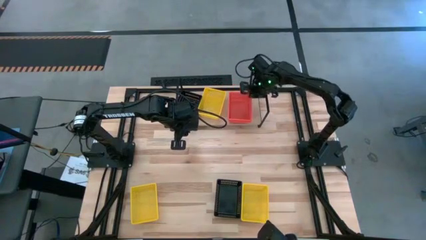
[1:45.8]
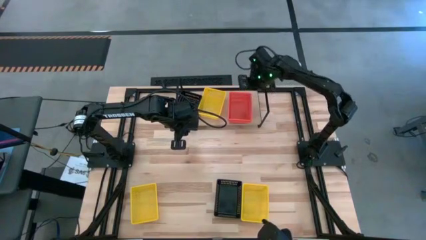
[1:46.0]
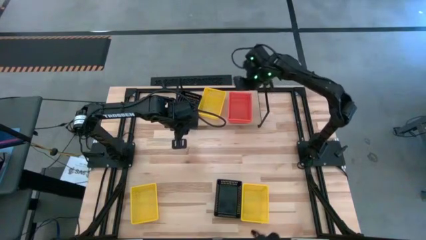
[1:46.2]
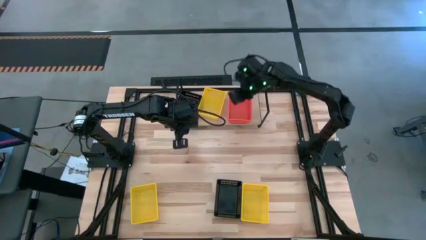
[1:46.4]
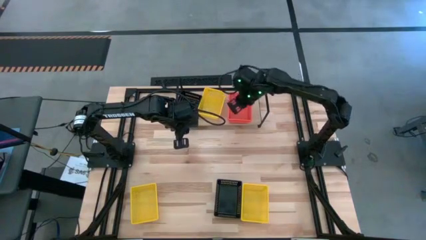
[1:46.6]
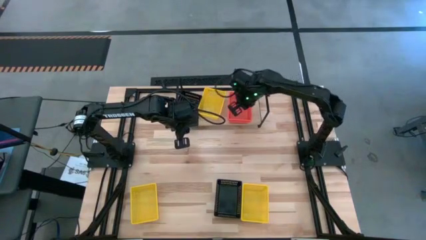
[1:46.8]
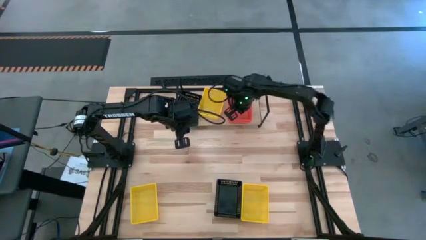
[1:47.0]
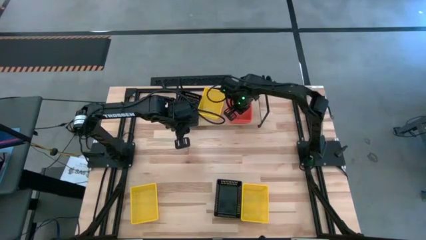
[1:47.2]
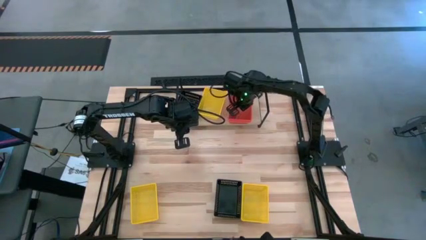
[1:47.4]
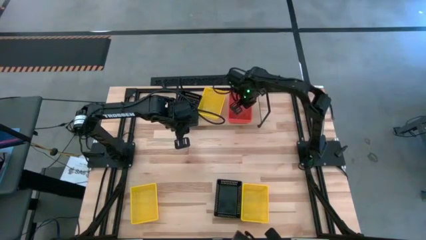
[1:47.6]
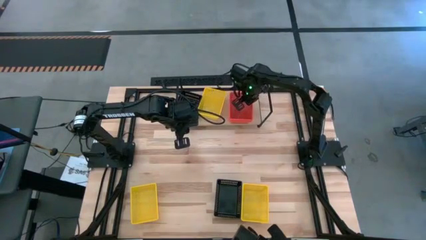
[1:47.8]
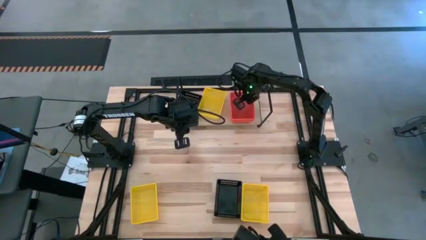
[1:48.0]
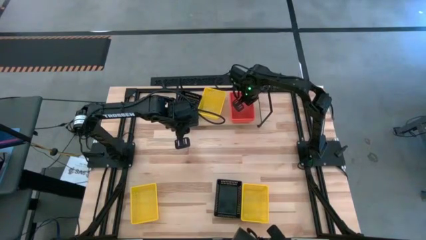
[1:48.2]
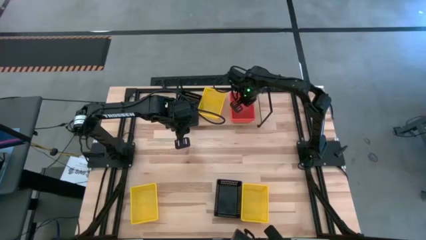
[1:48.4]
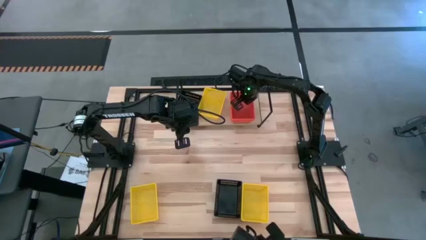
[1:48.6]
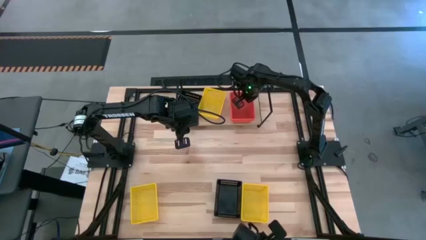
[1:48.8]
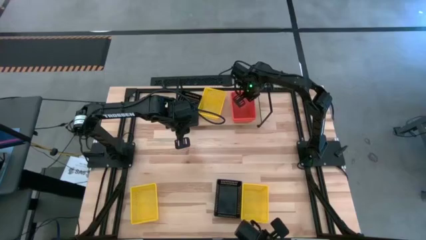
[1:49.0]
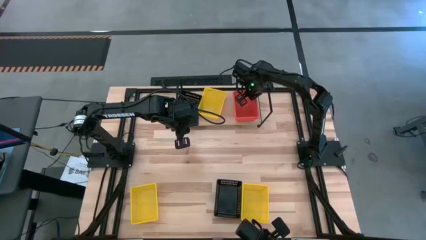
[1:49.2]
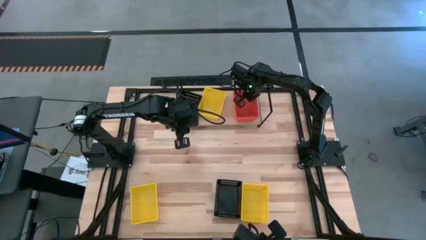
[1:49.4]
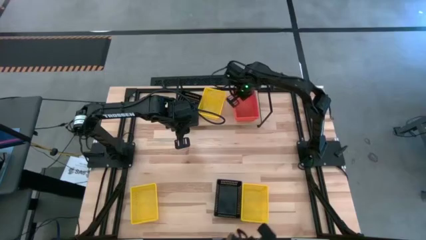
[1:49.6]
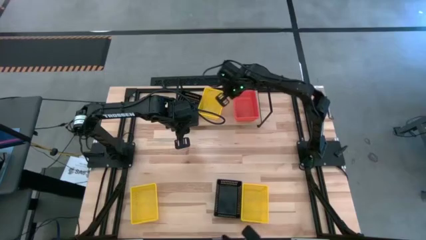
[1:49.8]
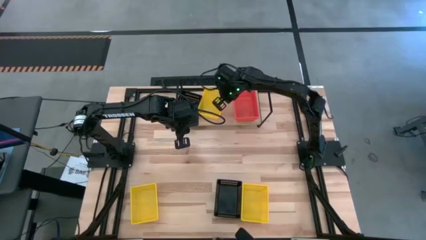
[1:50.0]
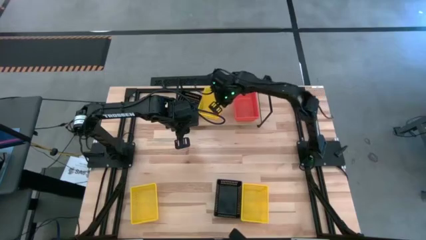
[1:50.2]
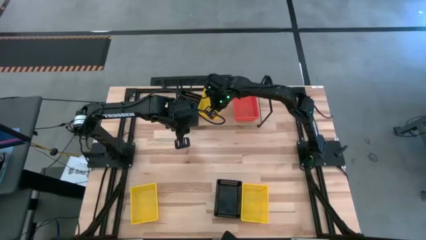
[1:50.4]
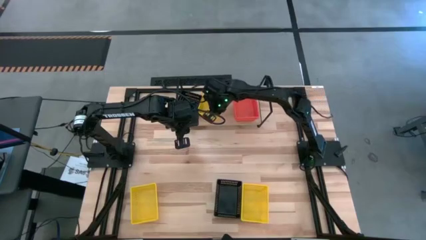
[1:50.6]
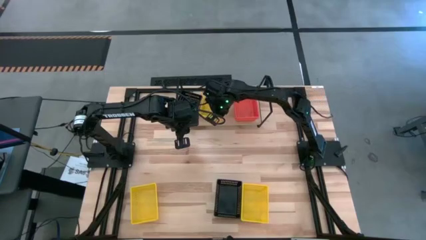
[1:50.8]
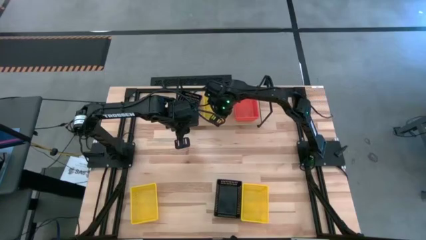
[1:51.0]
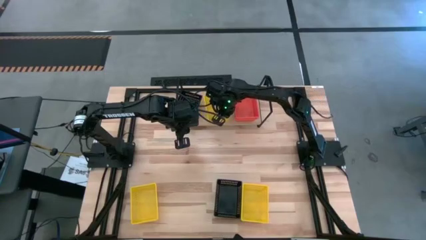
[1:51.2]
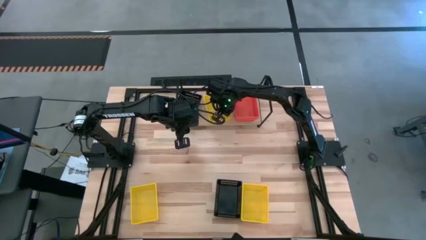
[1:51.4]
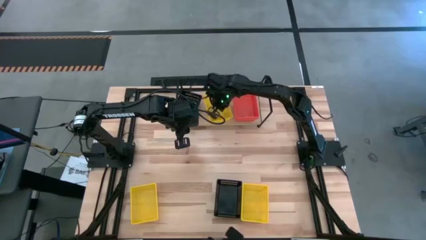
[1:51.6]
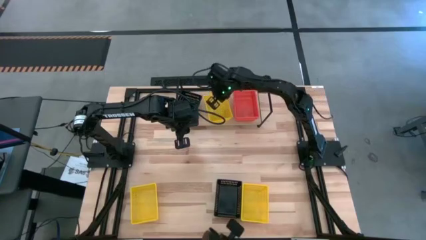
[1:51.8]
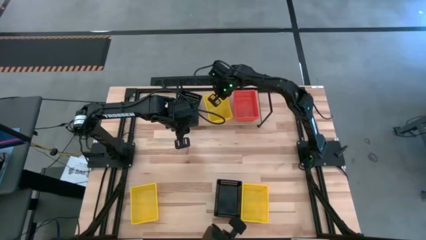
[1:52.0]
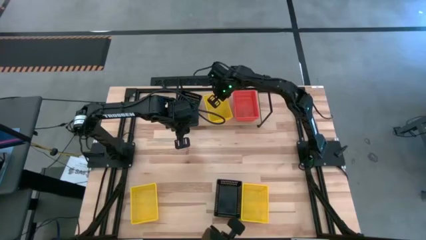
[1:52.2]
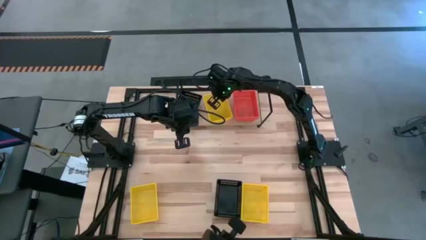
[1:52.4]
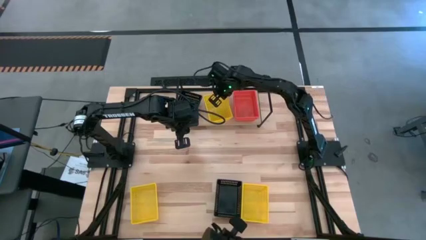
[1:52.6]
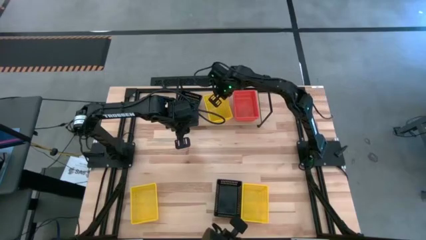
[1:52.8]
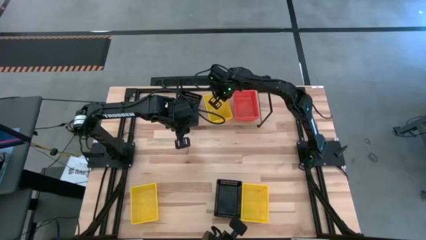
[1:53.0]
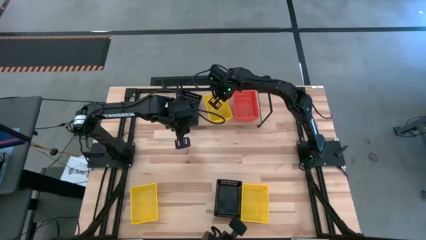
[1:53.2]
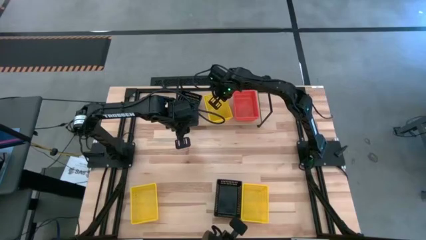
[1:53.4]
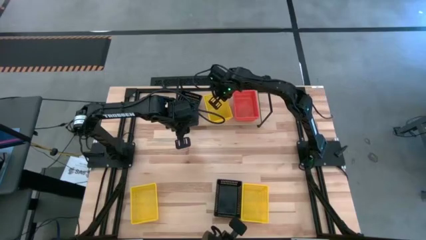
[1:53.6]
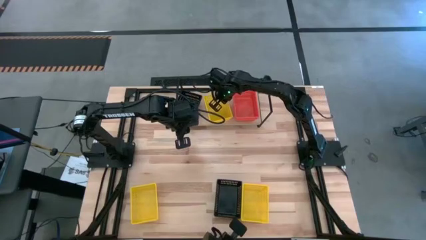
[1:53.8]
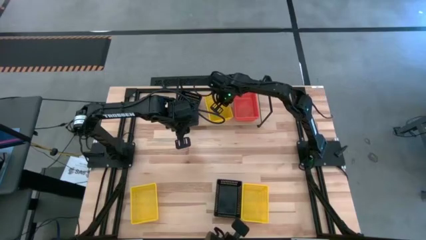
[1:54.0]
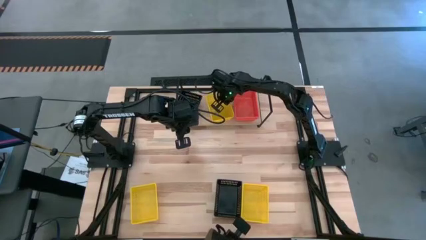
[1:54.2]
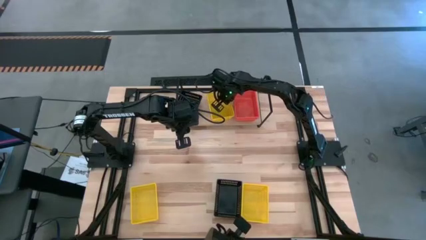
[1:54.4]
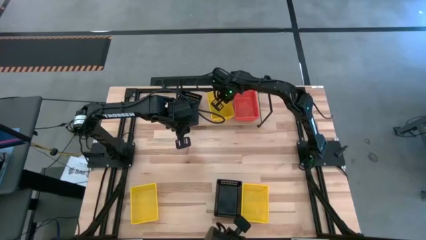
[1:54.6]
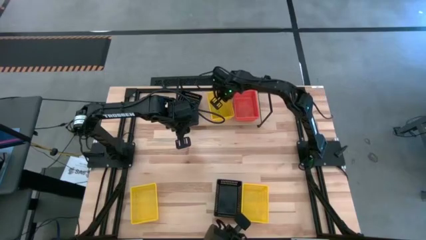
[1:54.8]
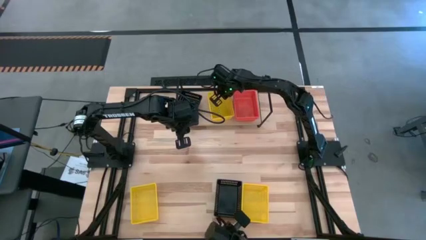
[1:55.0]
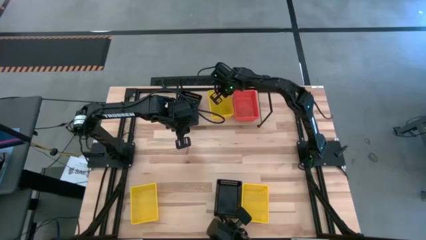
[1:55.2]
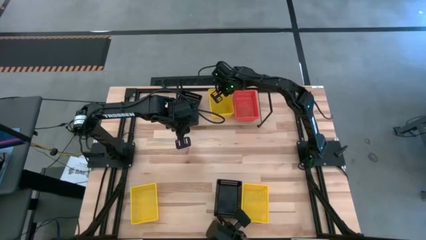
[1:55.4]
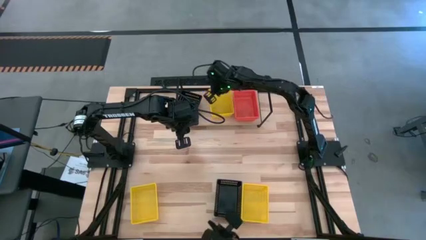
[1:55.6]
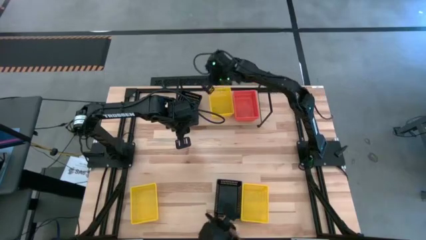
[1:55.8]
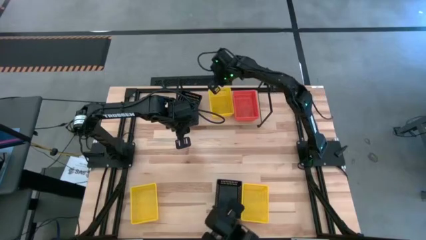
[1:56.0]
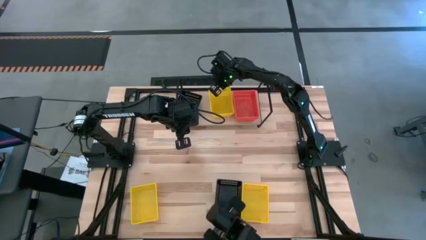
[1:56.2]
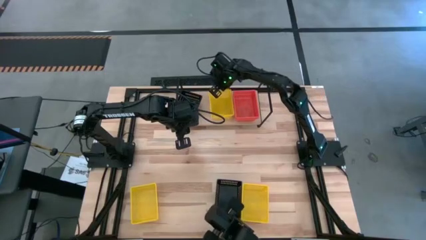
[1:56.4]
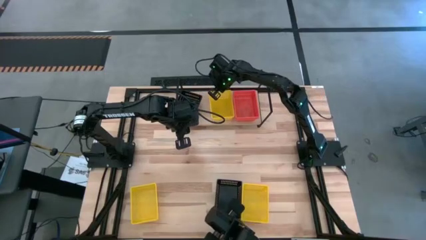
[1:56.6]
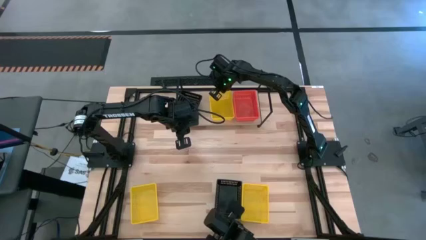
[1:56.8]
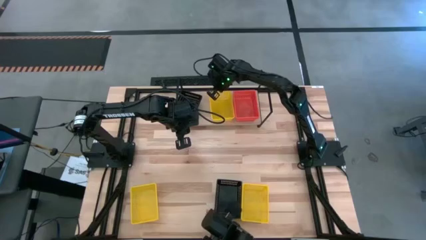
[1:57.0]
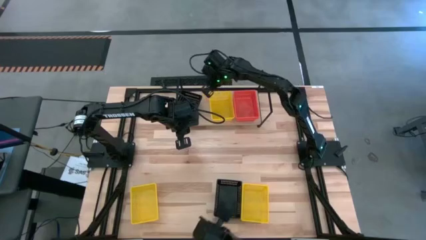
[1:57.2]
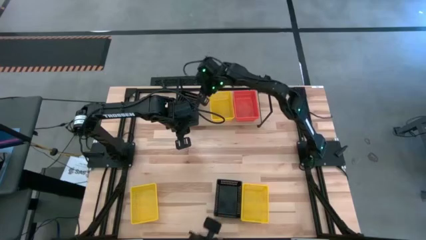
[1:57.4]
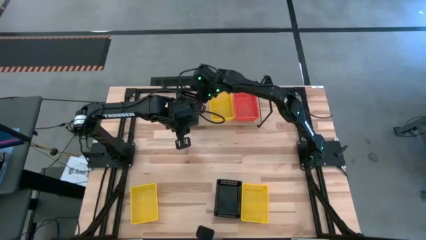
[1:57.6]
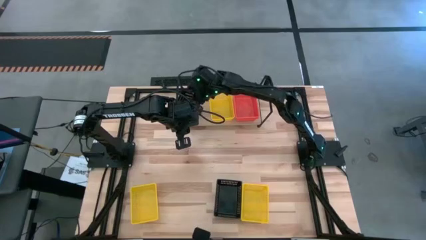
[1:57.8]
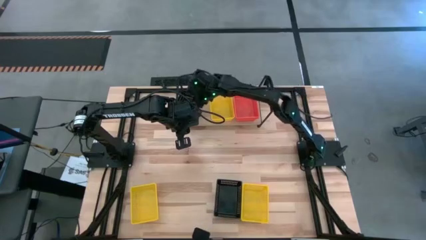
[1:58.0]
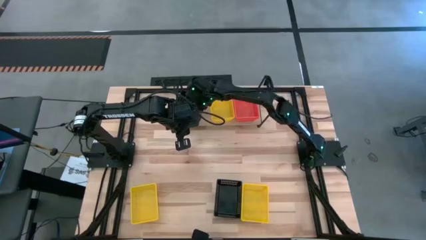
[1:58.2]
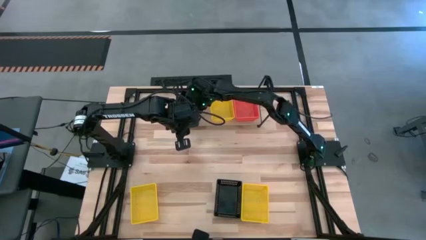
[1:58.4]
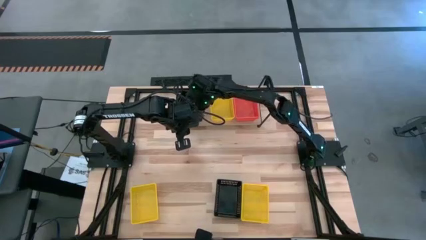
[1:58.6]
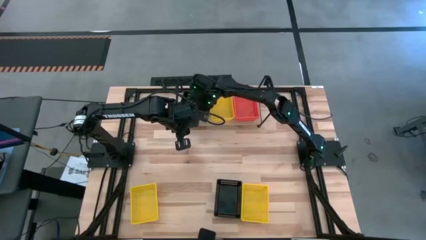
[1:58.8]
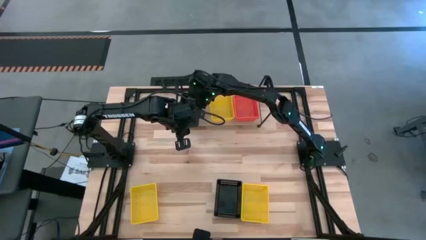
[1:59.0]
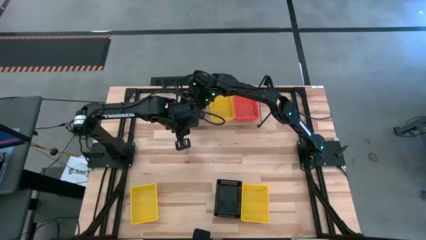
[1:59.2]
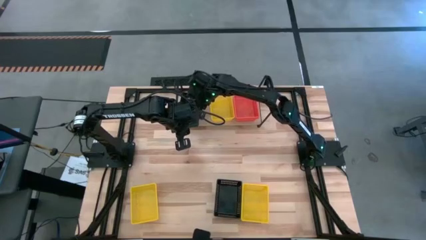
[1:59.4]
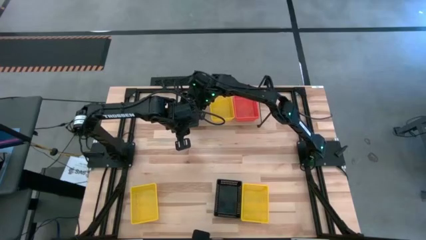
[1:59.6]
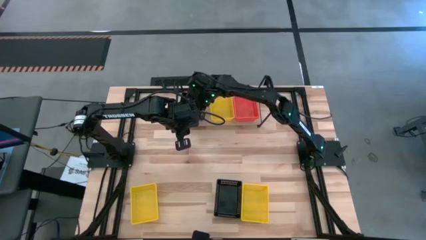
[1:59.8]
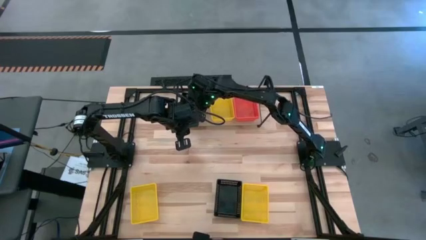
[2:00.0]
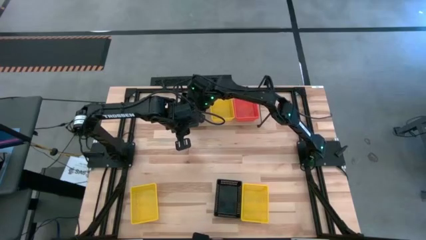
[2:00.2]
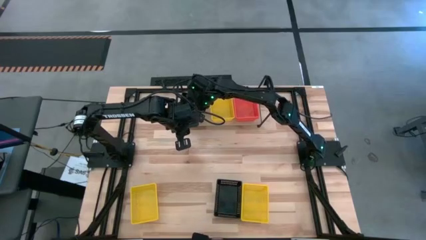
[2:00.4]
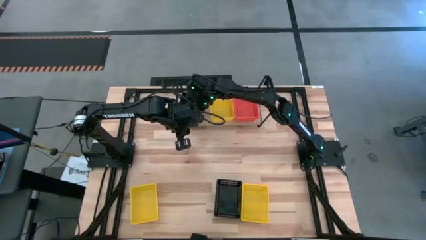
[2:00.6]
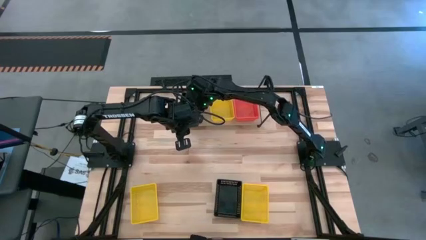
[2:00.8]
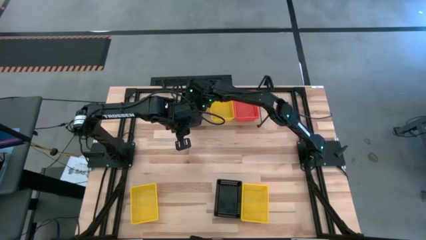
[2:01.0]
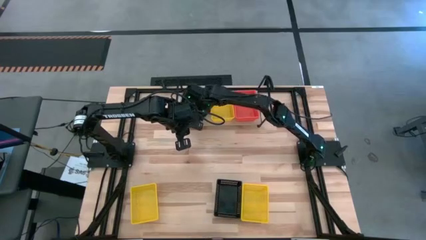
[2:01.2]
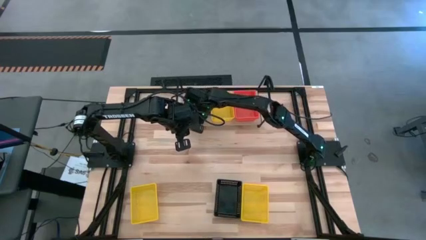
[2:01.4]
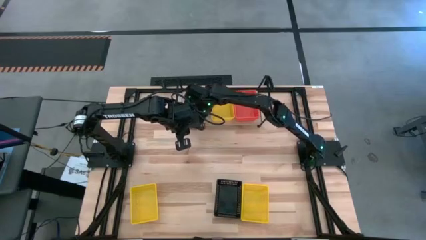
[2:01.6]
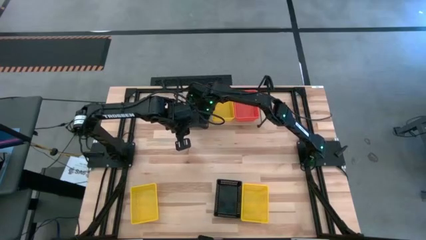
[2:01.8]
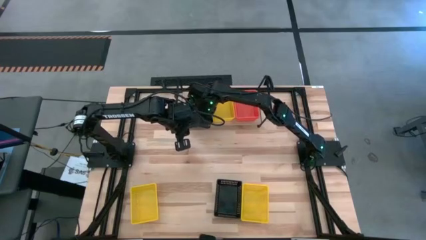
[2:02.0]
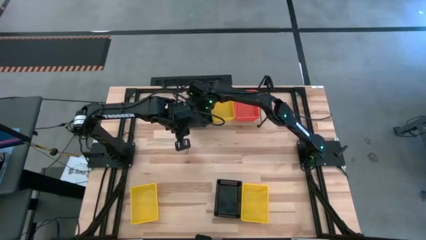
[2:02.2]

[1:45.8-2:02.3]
Task: Stack baskets on shelf by color
Adjust all the bins on the shelf
